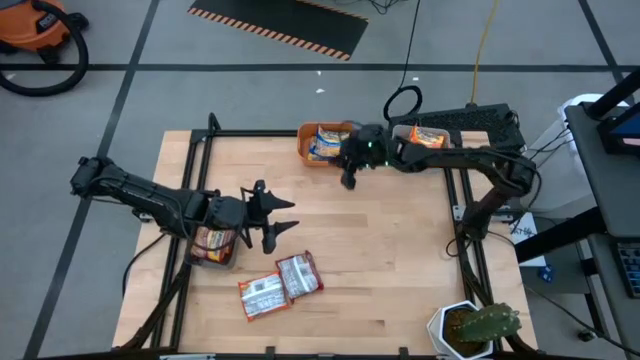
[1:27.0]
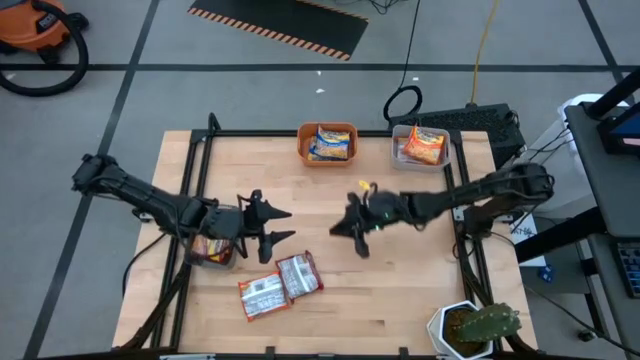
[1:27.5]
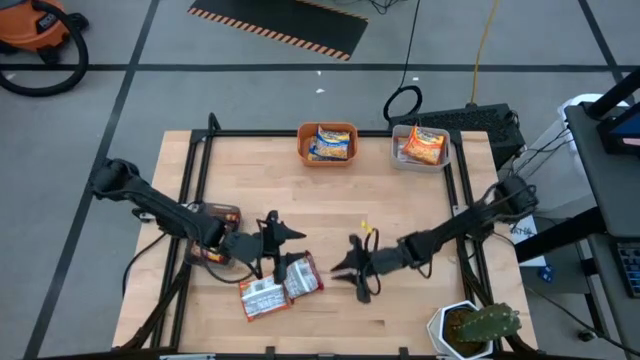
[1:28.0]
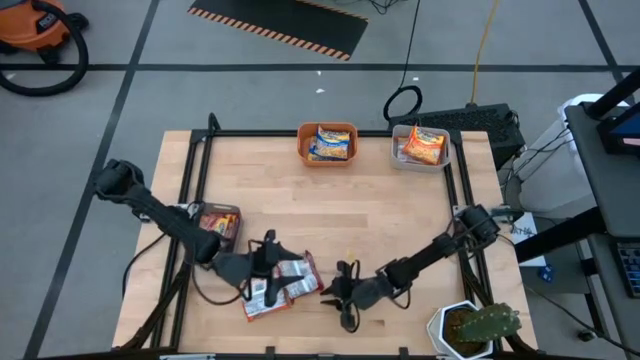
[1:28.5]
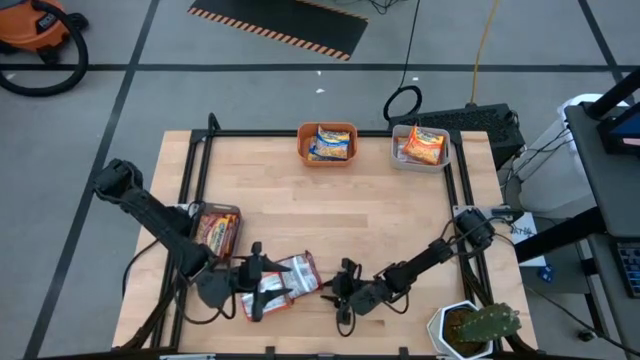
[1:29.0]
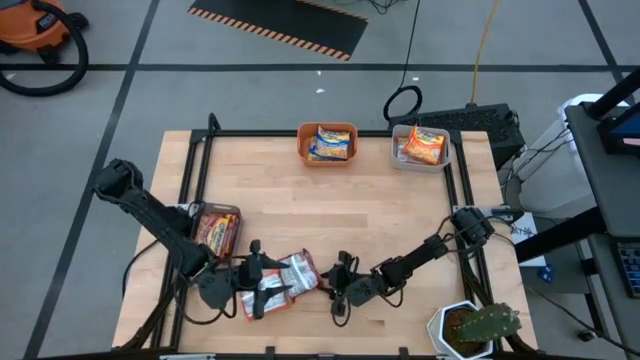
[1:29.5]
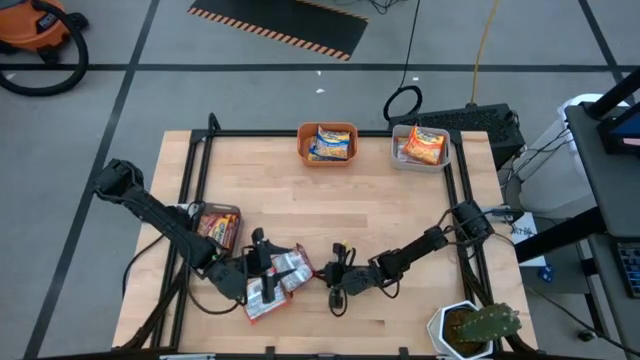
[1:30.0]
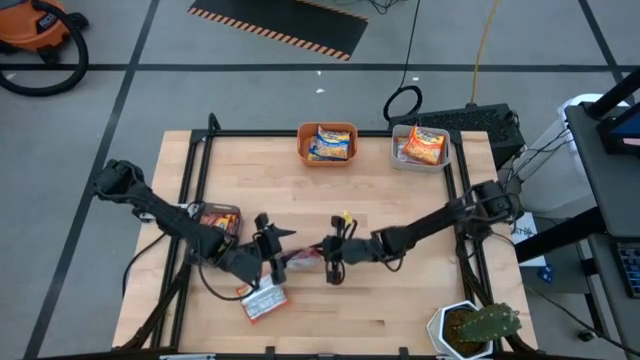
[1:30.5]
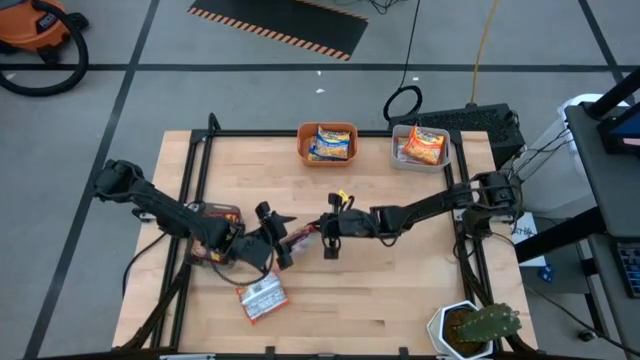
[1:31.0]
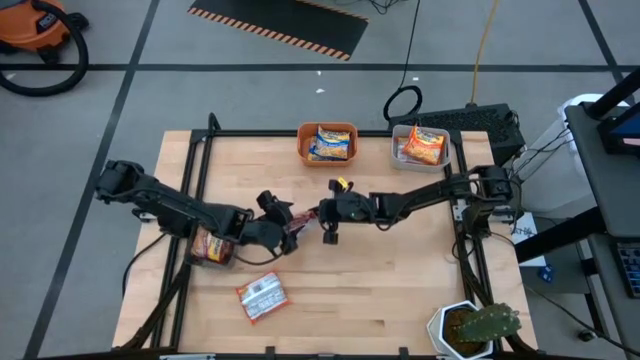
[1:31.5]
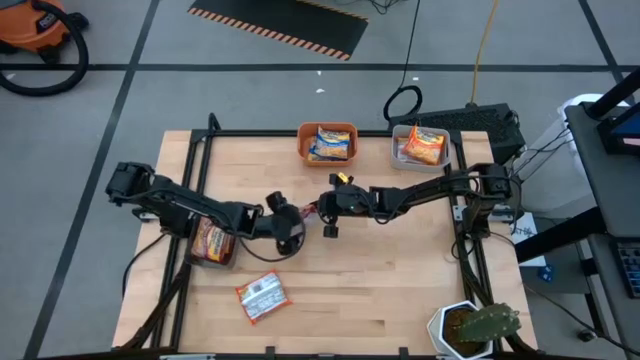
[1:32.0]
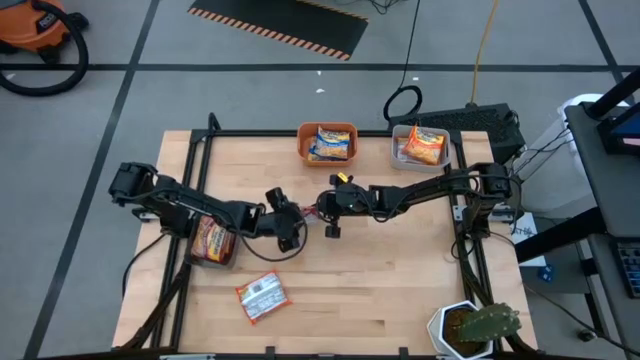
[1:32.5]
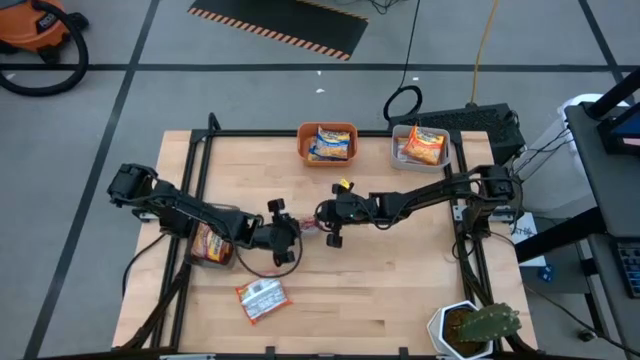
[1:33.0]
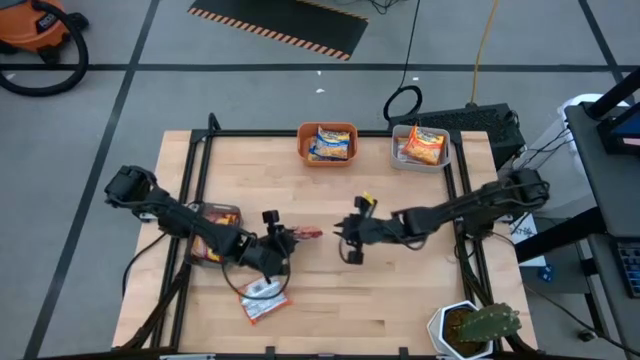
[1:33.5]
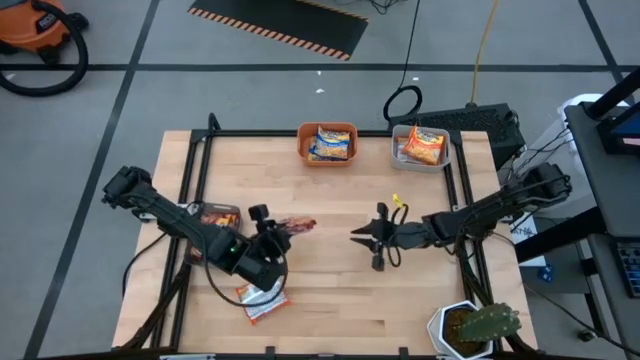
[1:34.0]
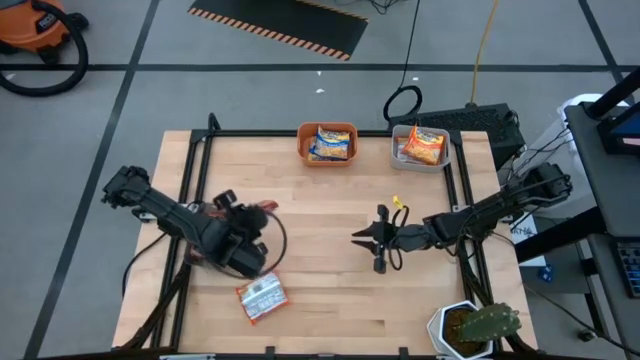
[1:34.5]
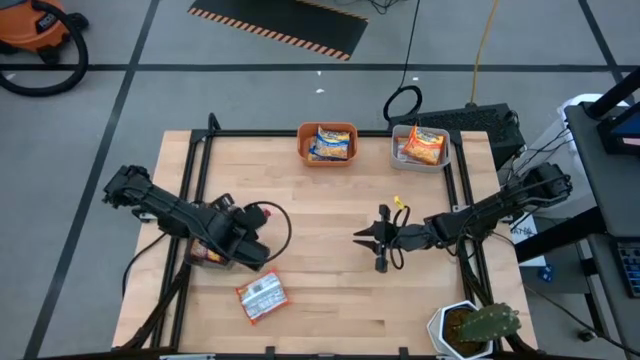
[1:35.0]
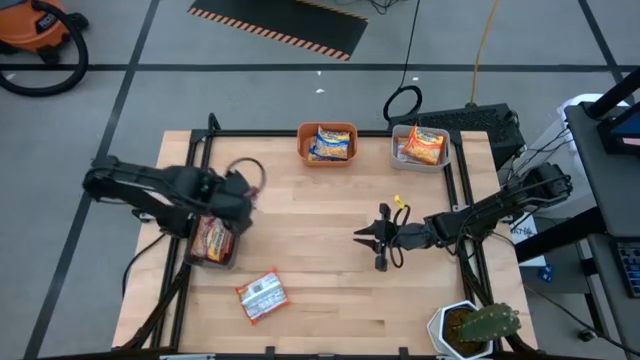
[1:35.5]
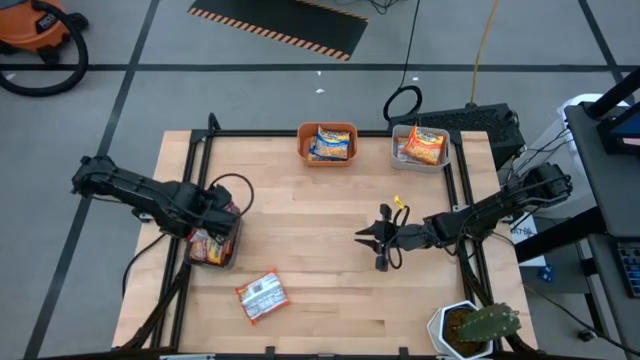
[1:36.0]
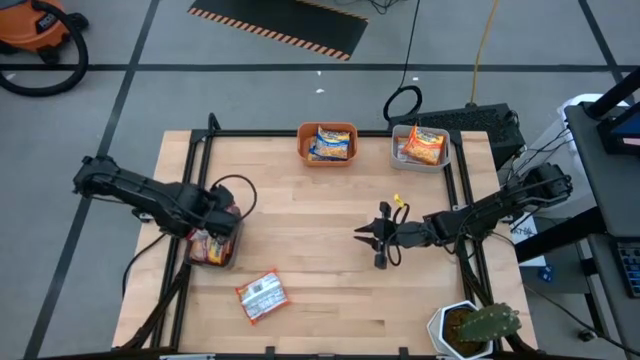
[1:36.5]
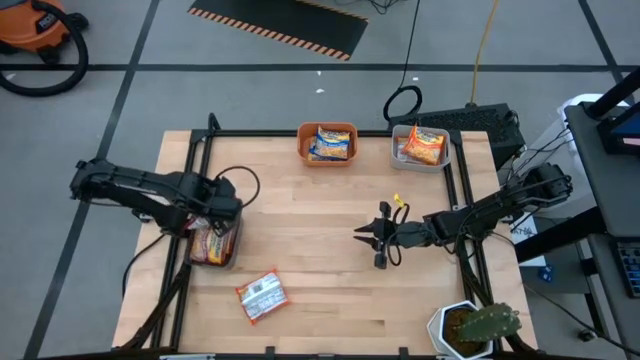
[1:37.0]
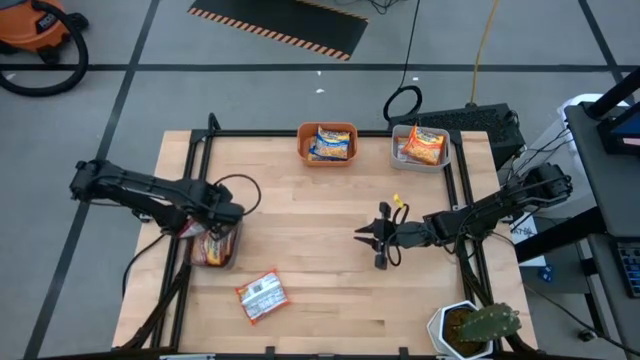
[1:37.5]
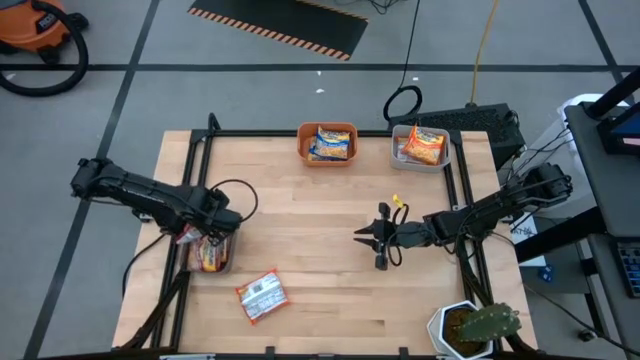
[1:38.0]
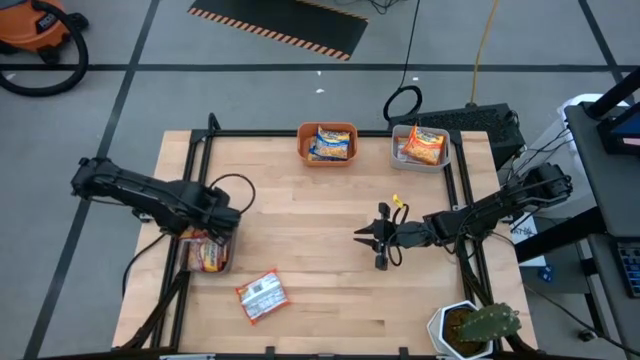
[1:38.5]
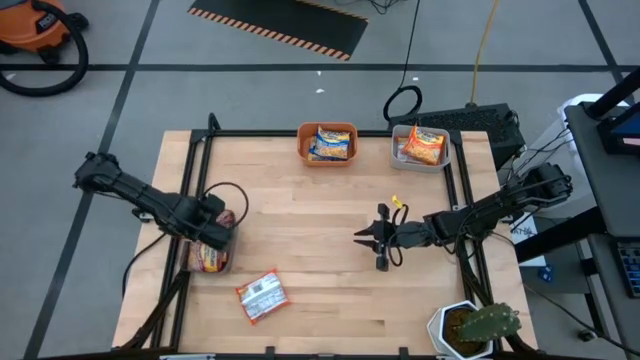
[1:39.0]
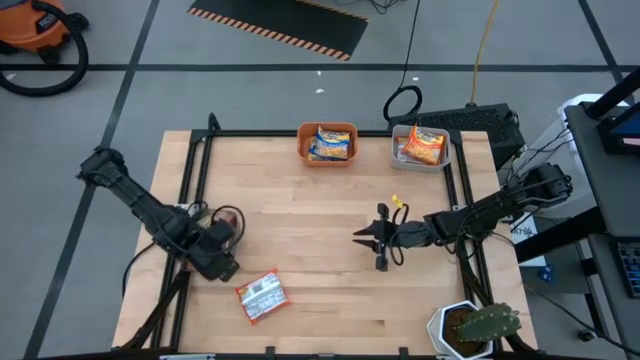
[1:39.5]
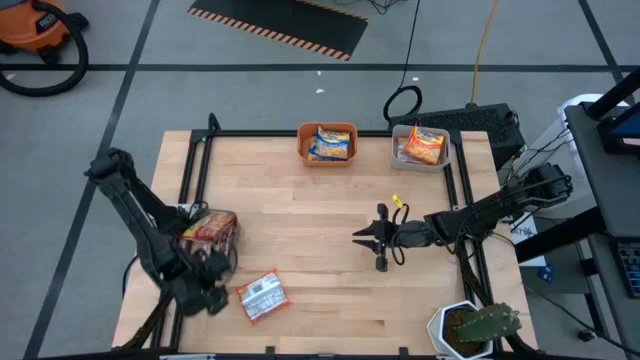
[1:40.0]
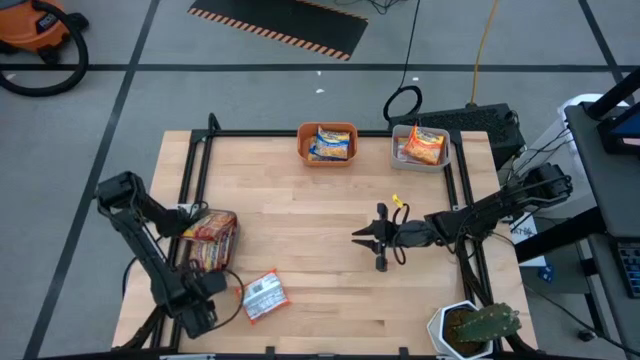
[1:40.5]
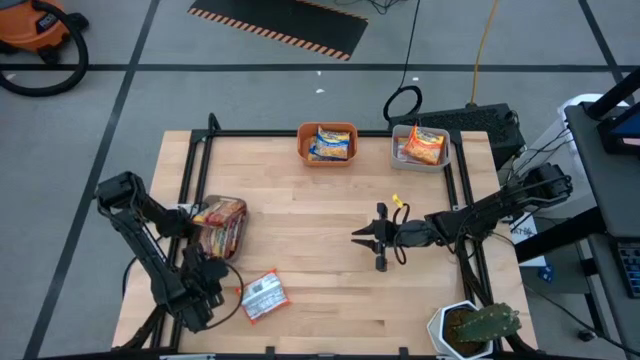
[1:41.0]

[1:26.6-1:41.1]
Task: Sort Maruchan noodles
Put the red noodle pack into the black bin

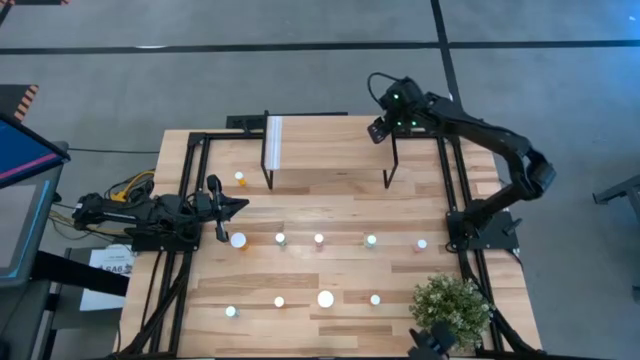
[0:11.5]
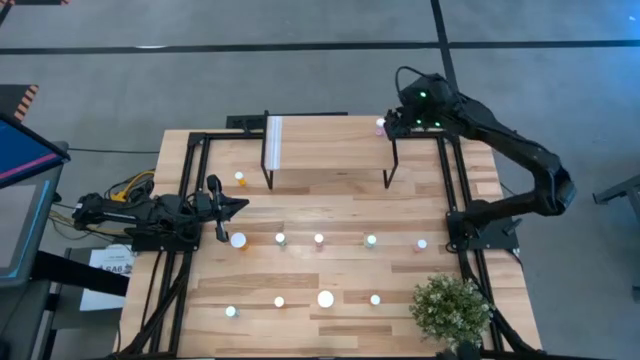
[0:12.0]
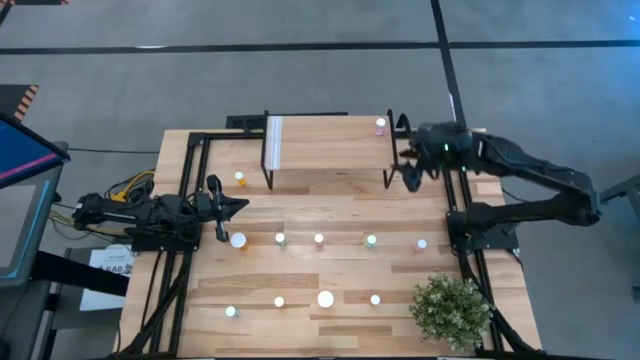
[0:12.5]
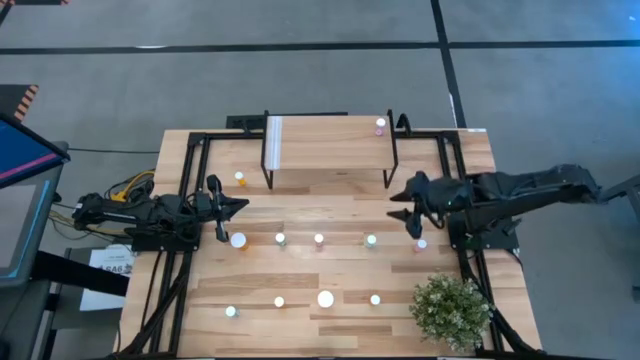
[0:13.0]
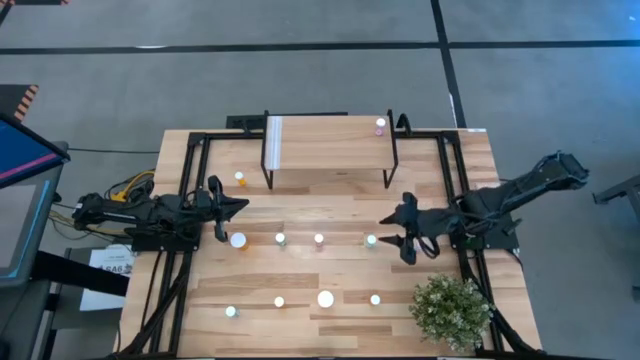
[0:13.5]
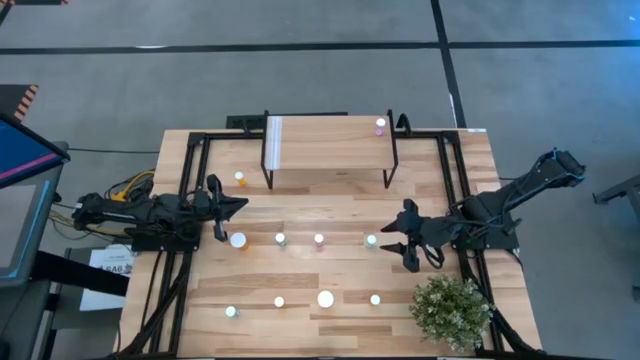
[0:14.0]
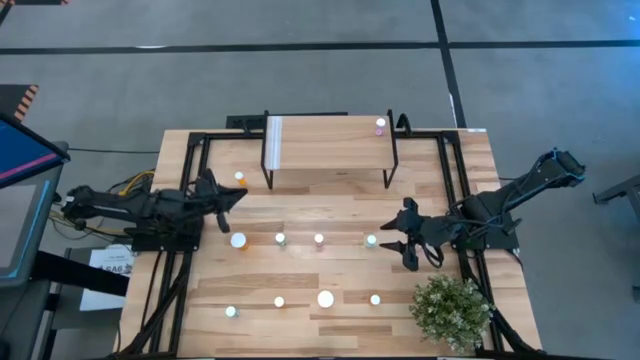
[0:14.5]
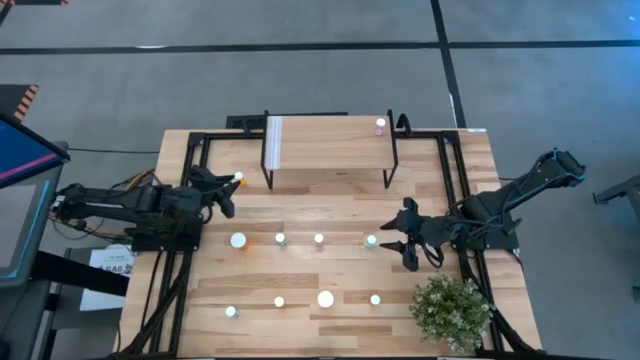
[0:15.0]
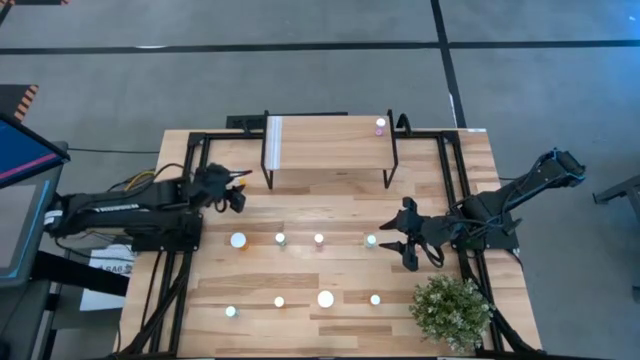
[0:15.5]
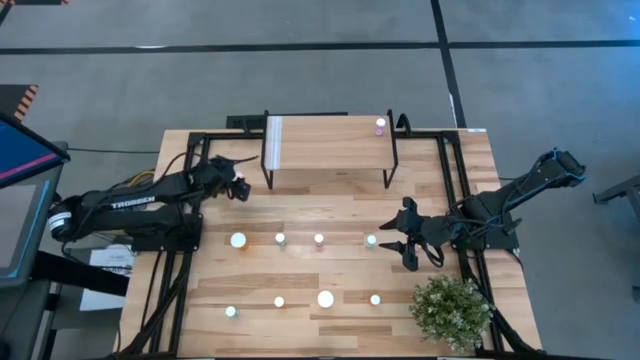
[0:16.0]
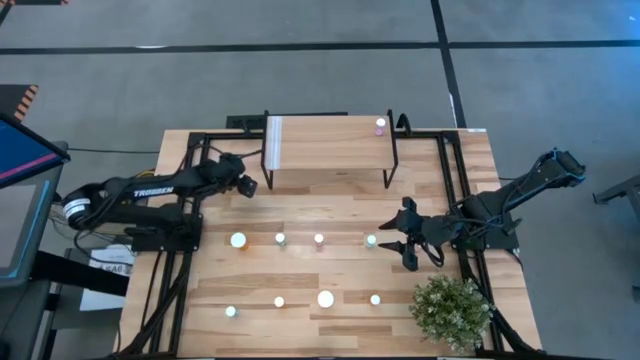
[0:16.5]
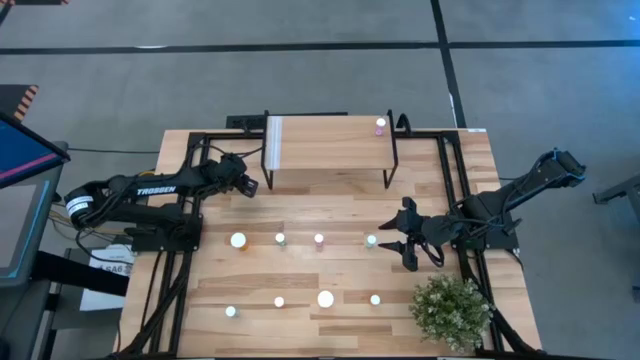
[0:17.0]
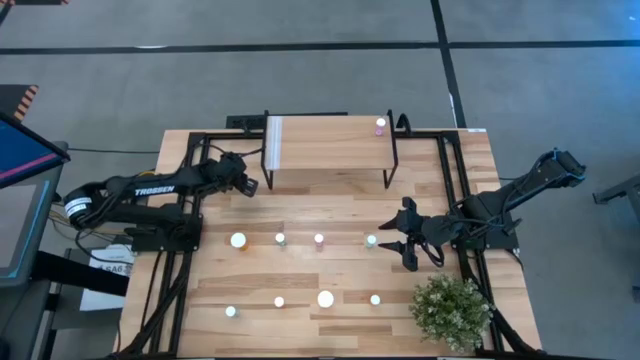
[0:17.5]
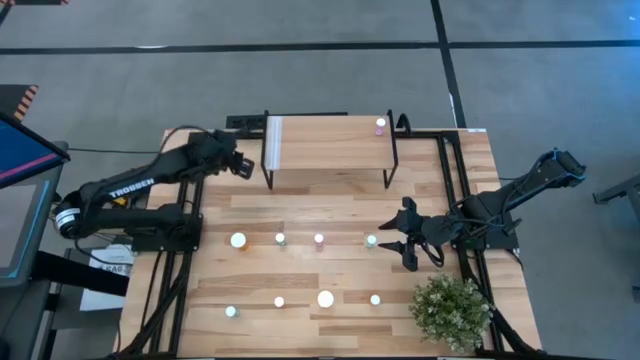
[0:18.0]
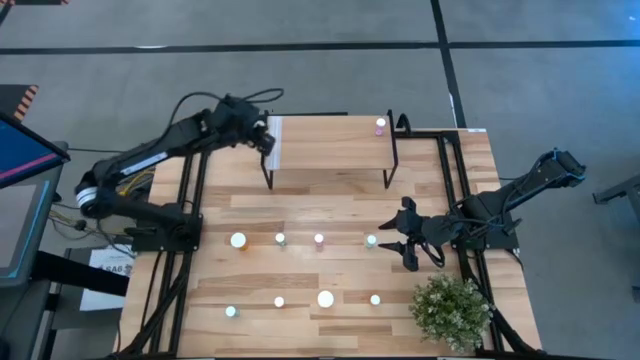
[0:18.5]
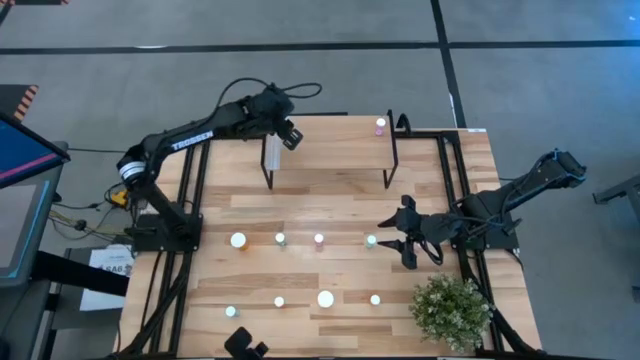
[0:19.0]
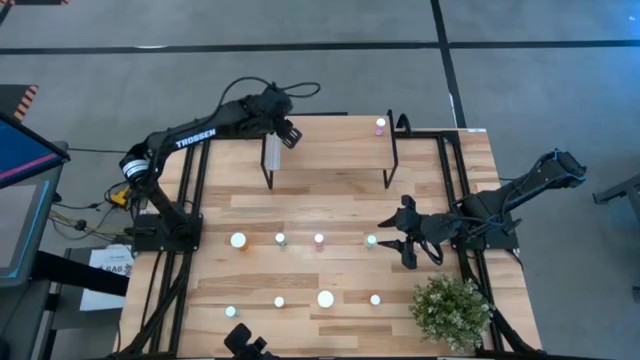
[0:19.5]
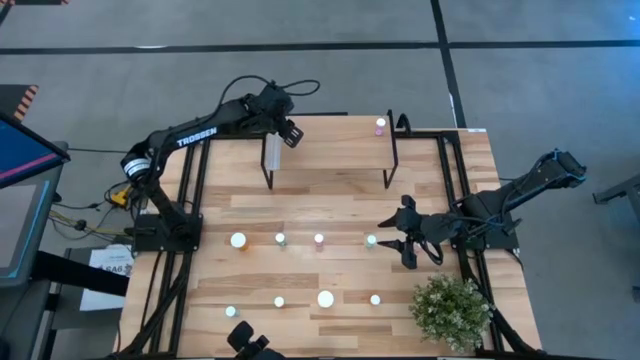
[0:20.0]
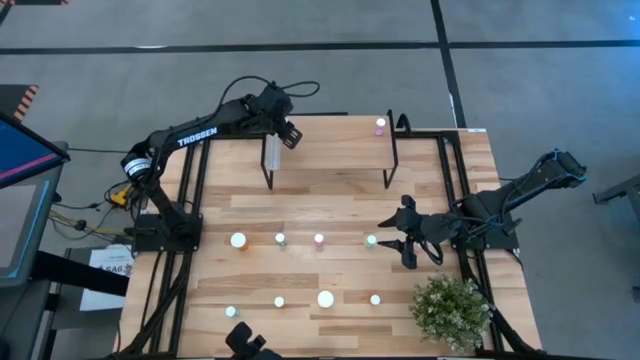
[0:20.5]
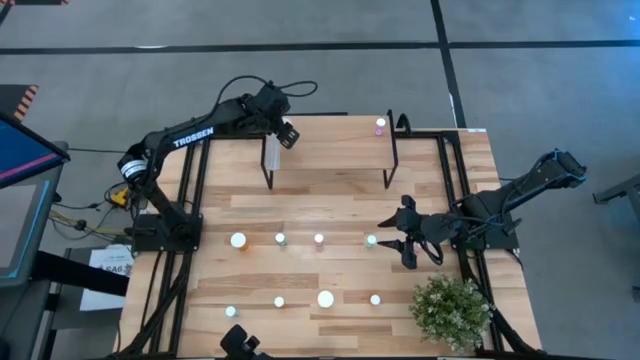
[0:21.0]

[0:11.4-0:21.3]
Task: Pick and place medicine bottles onto shelf by color
Put the top small orange pill bottle on the shelf
